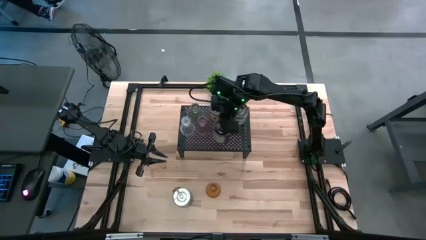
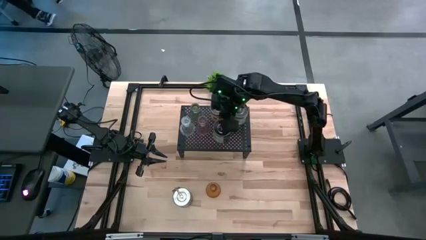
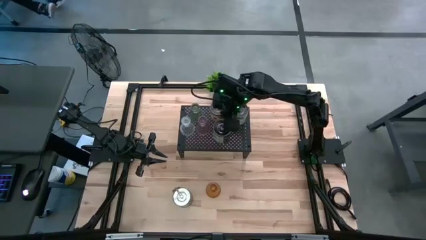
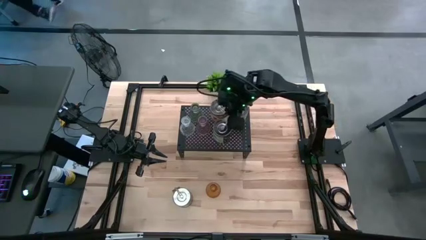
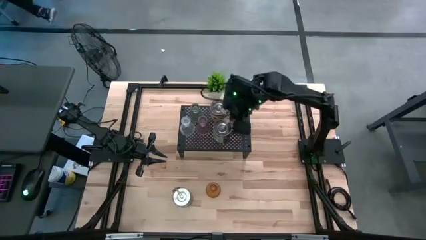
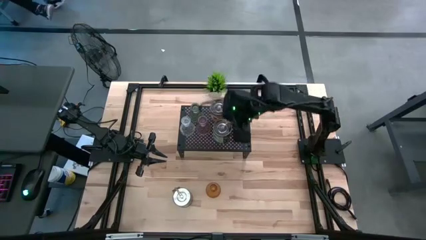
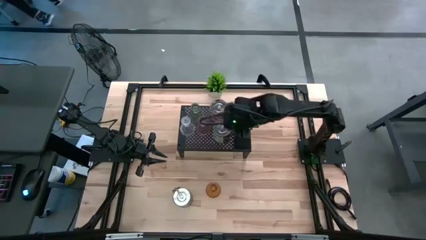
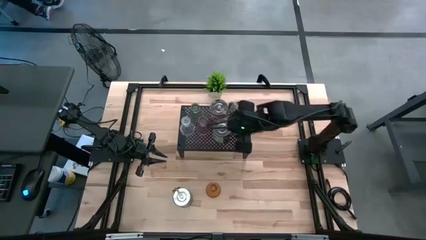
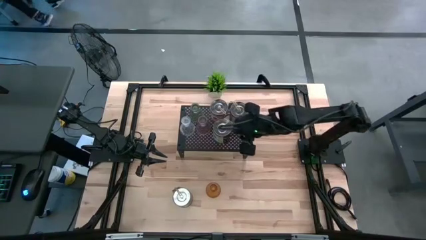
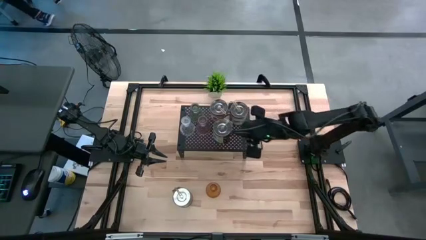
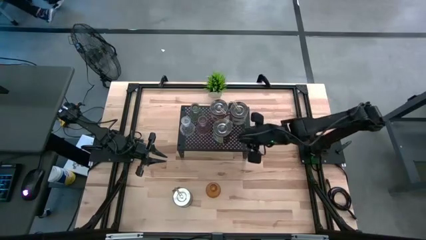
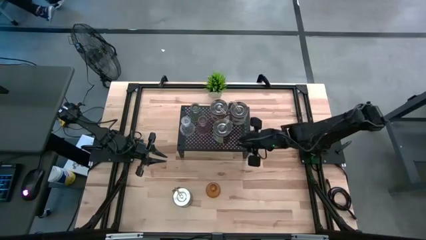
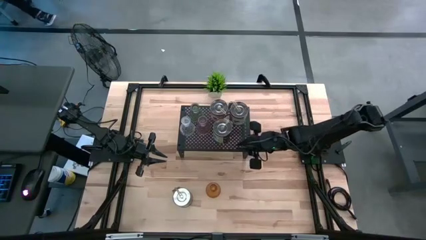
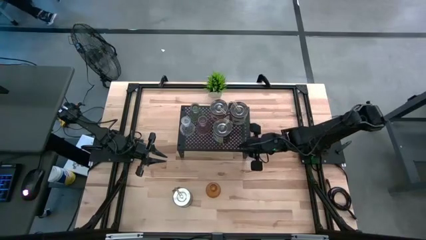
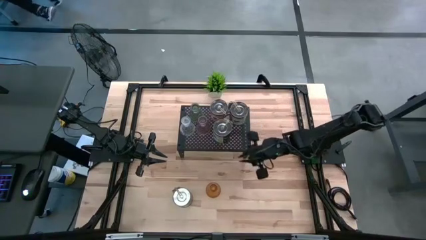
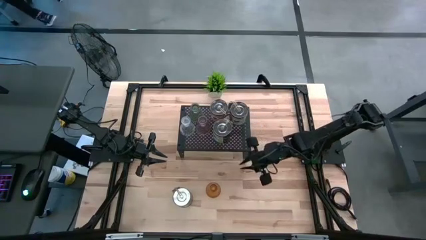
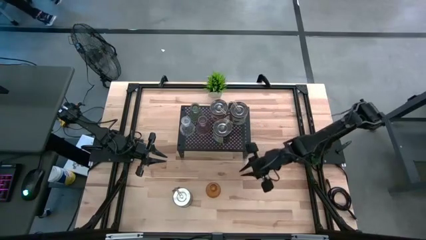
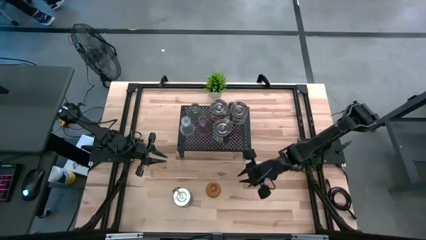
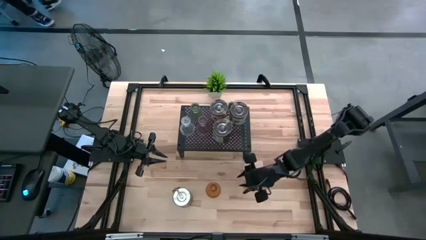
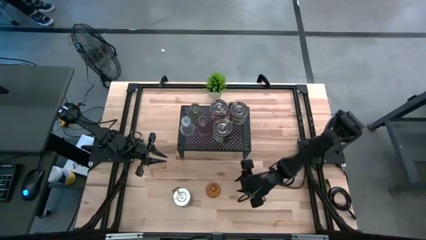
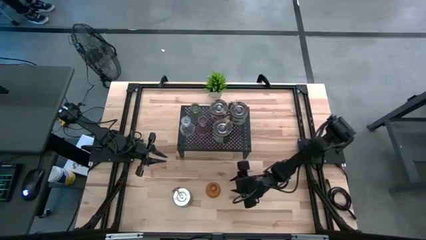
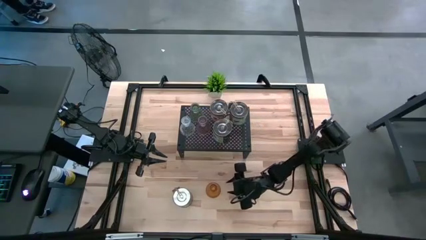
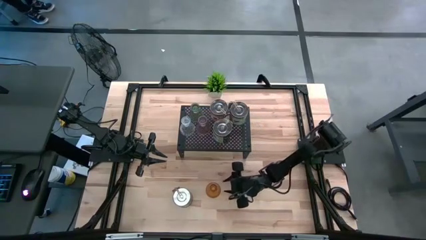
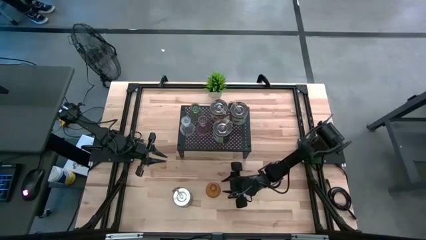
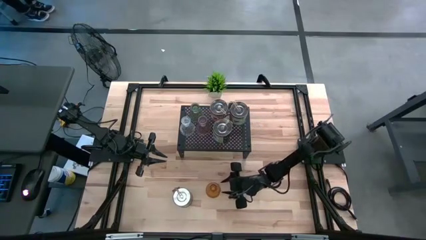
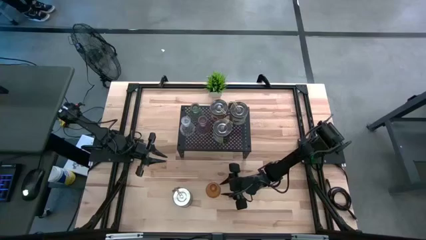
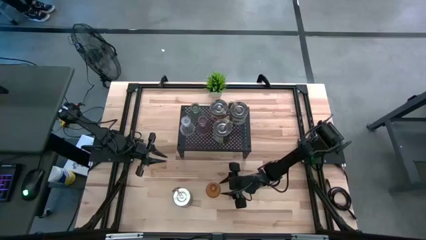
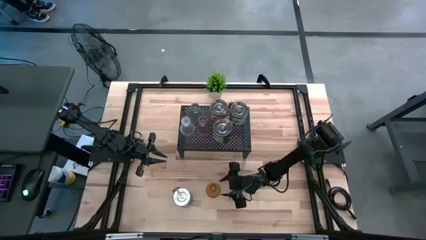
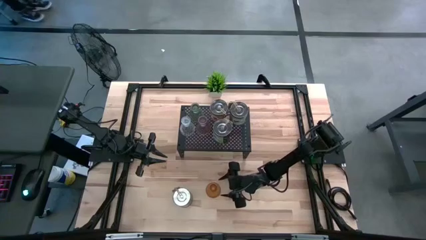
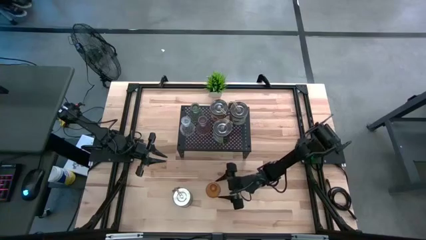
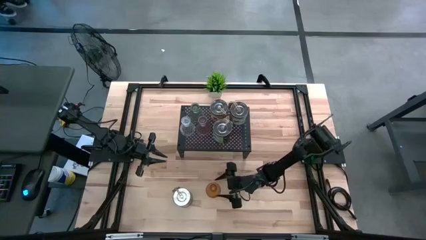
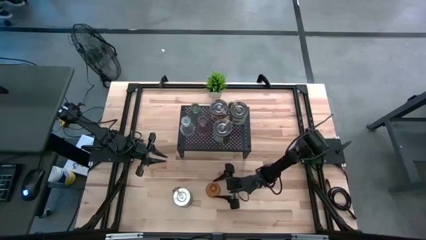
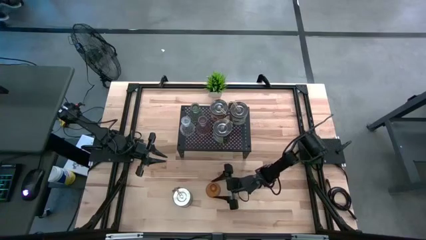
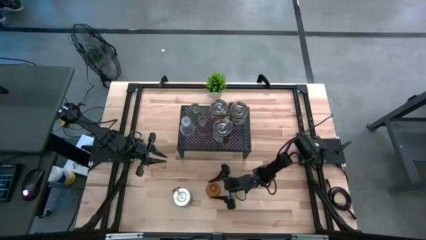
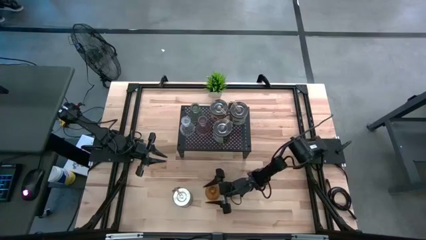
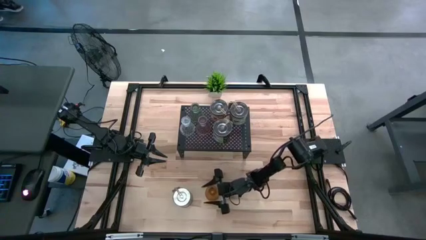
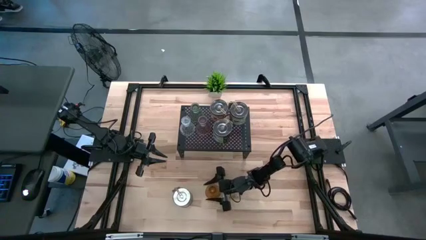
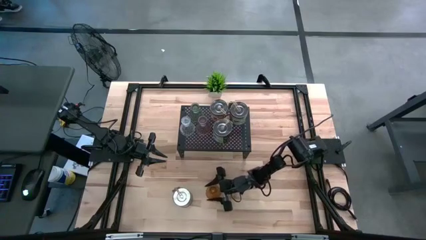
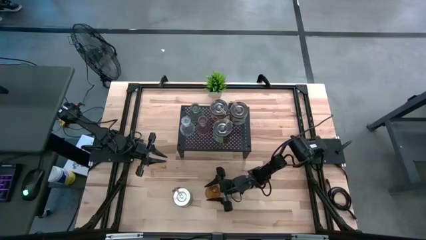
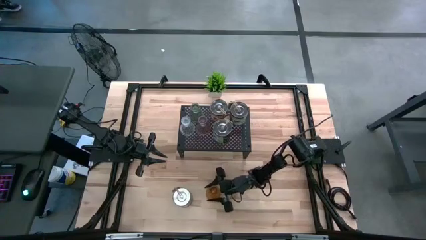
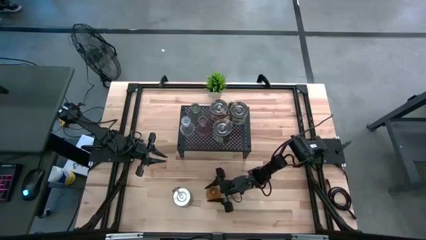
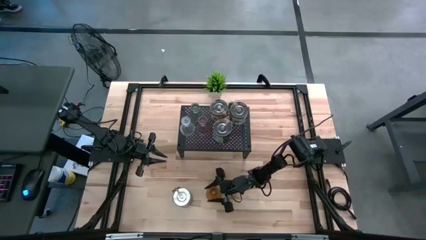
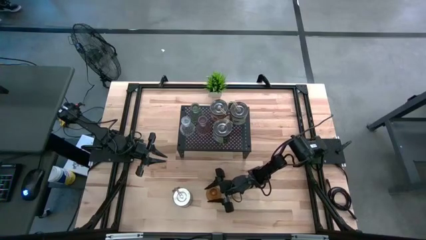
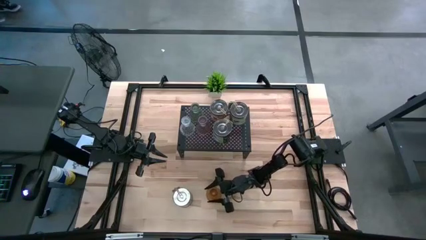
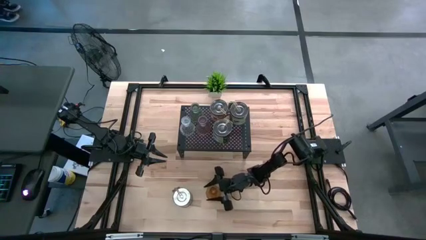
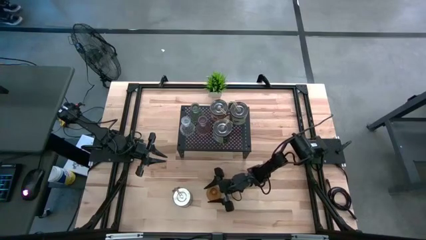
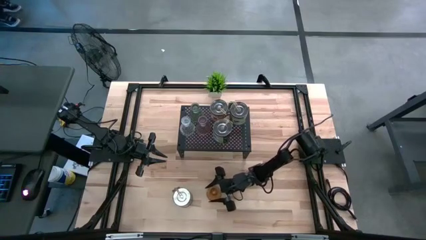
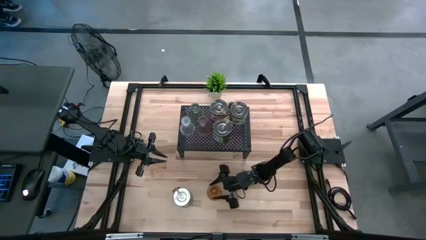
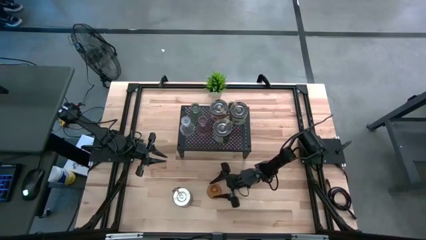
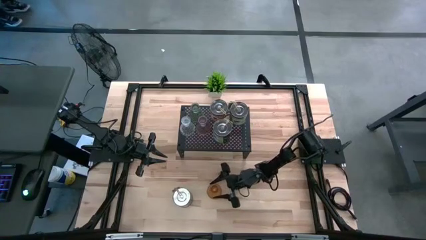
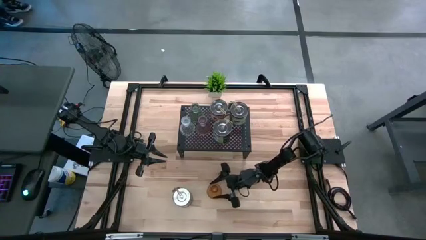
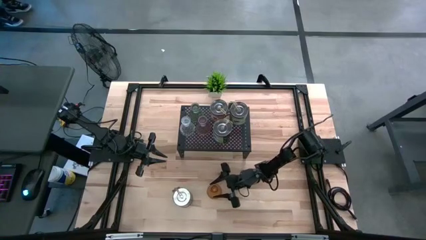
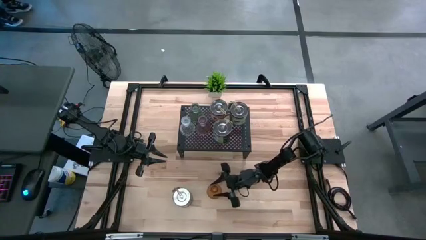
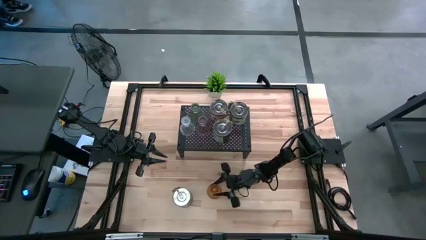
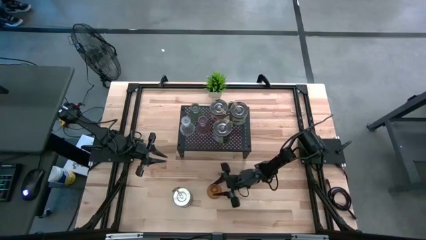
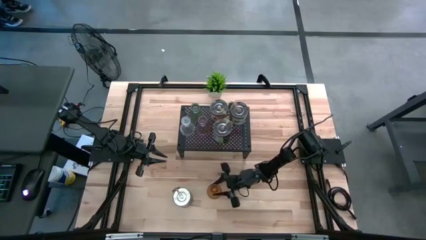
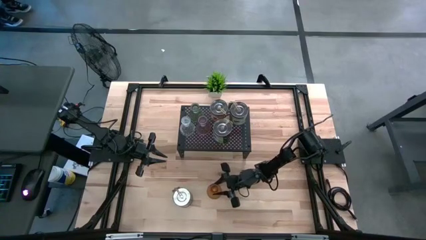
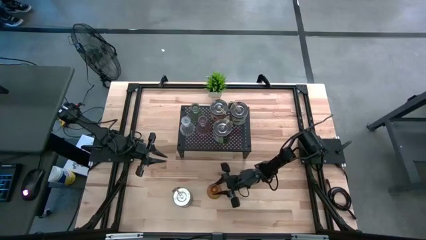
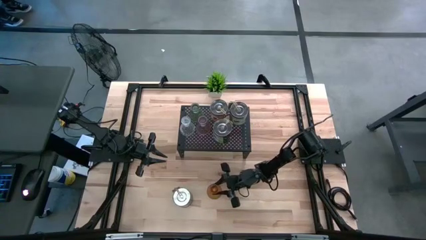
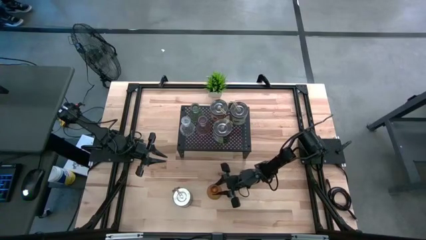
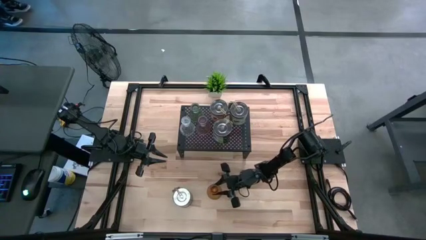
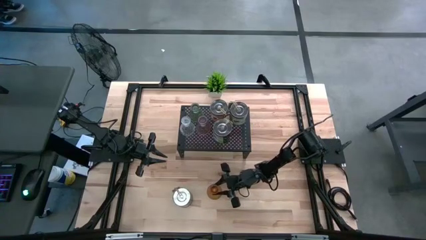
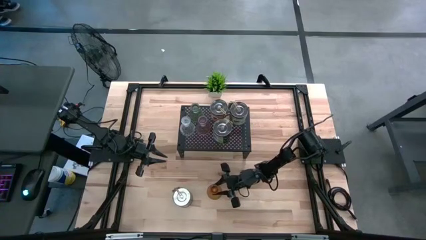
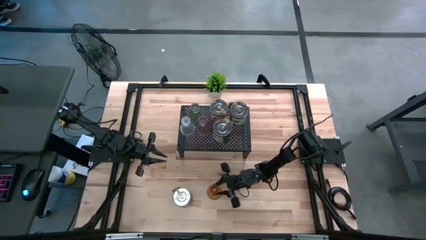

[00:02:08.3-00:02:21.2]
Task: Pick & Place candle stick holders
Put the yellow glass candle holder on the shelf

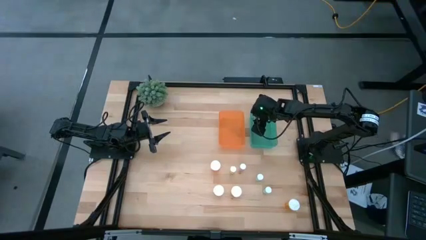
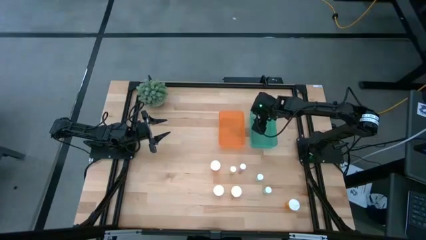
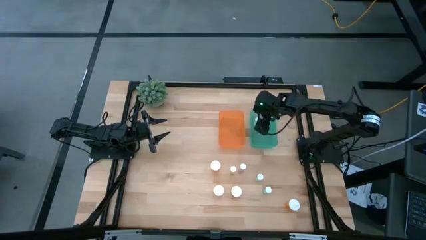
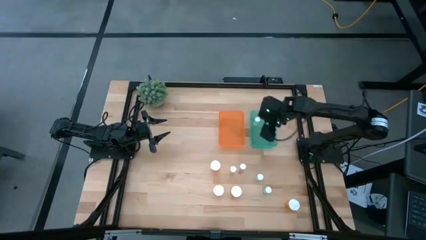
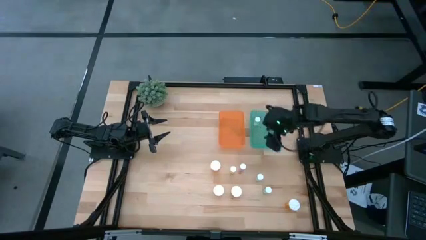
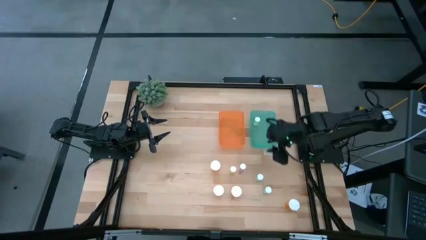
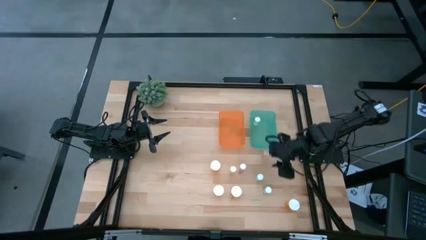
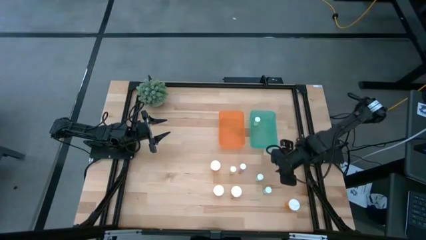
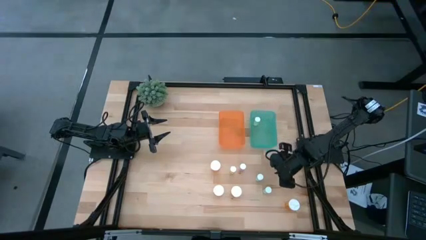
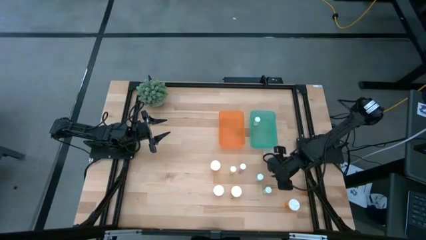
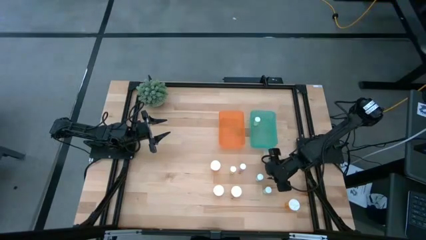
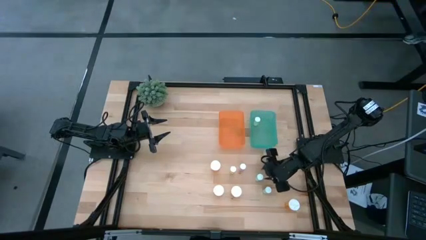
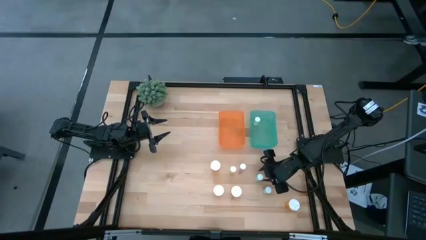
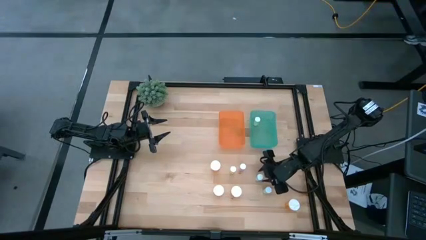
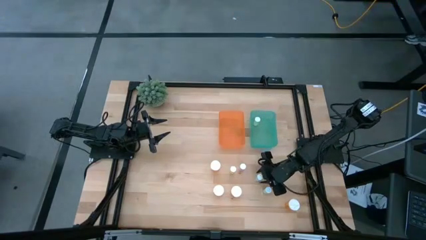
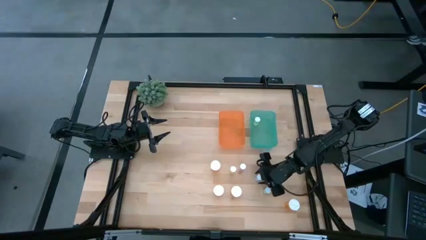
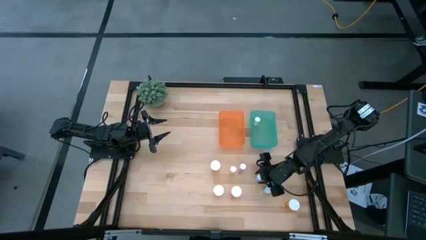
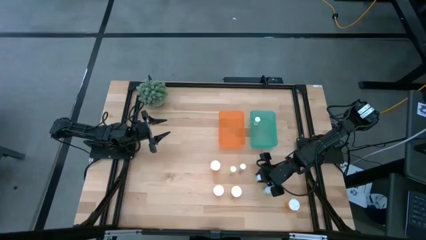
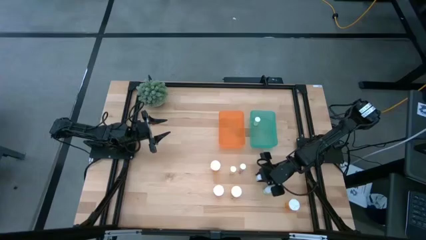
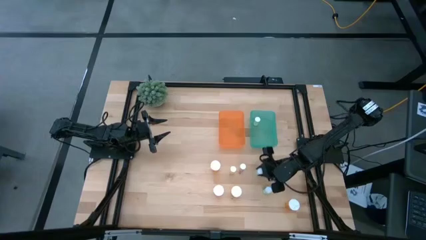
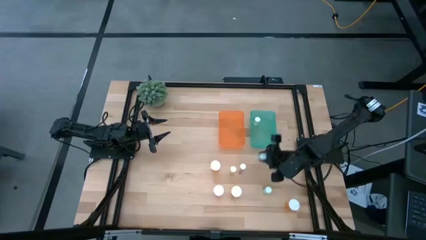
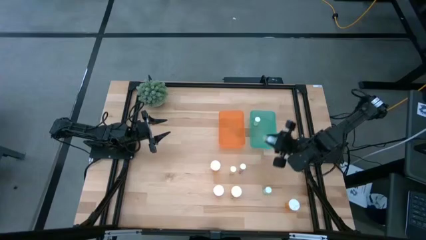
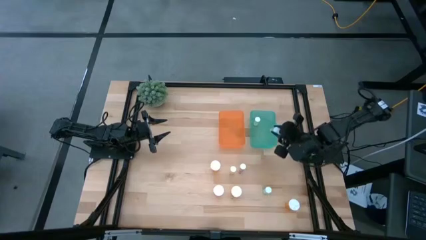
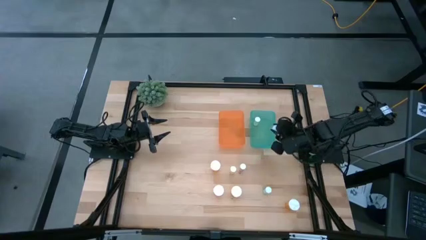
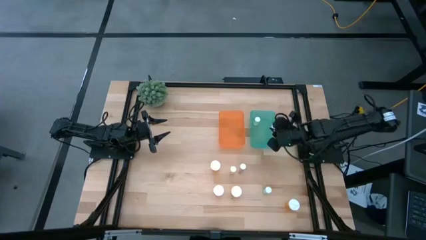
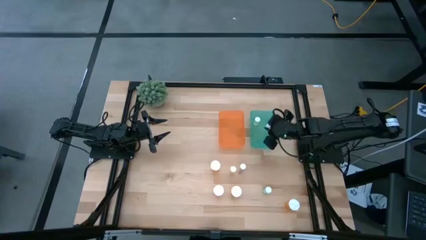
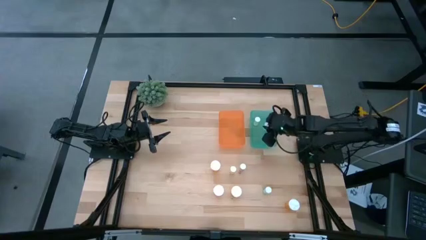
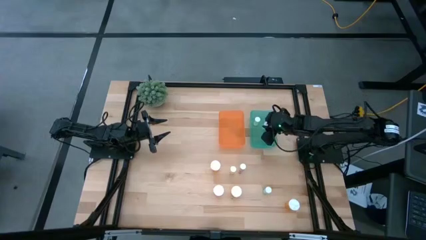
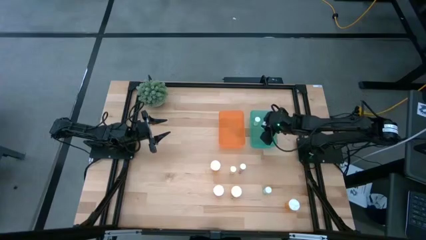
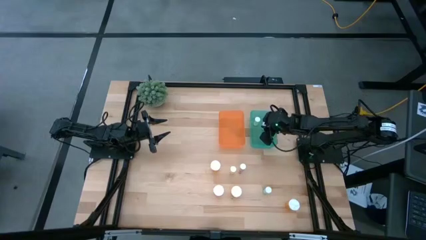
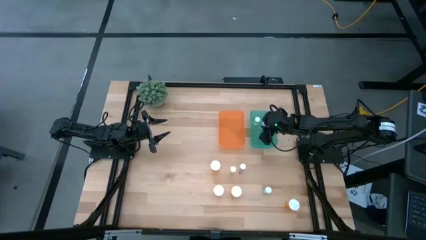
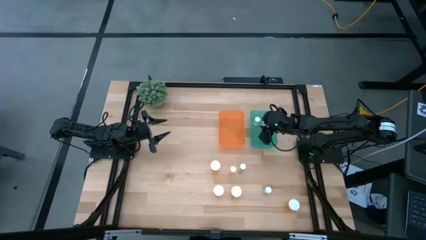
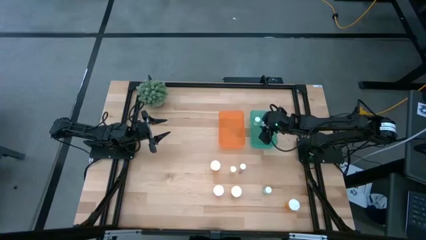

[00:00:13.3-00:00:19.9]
Task: Pick and place medicine bottles into bin by pill shape (circle, oval)
Put the top small green pill bottle into the green bin
